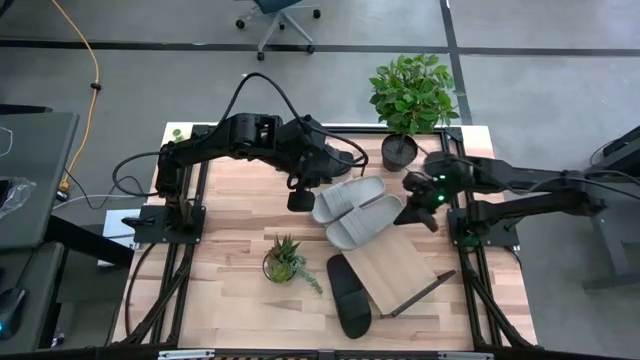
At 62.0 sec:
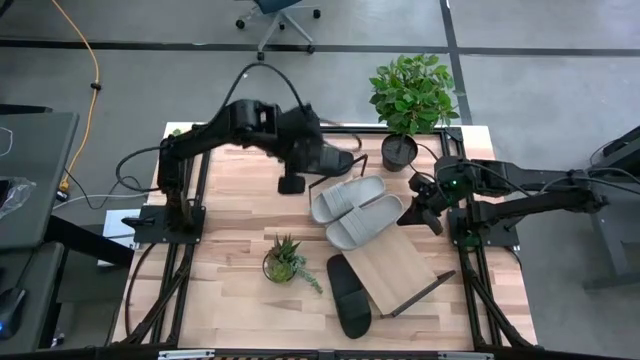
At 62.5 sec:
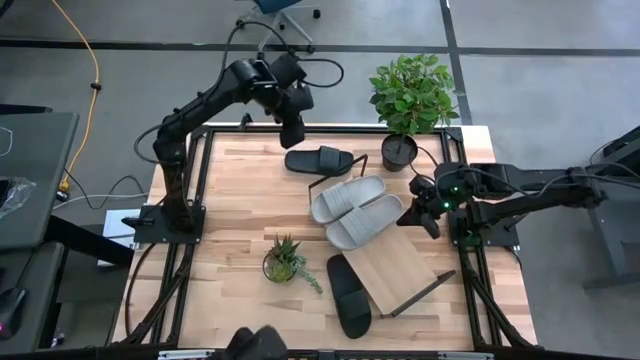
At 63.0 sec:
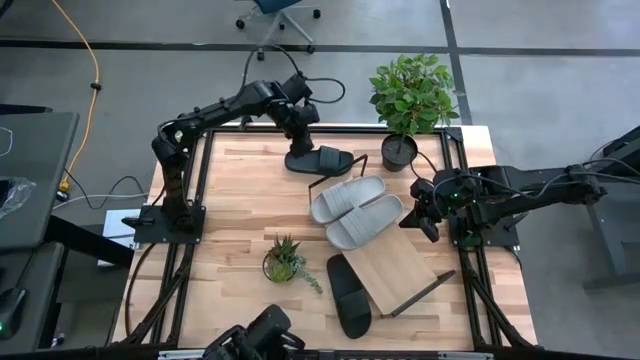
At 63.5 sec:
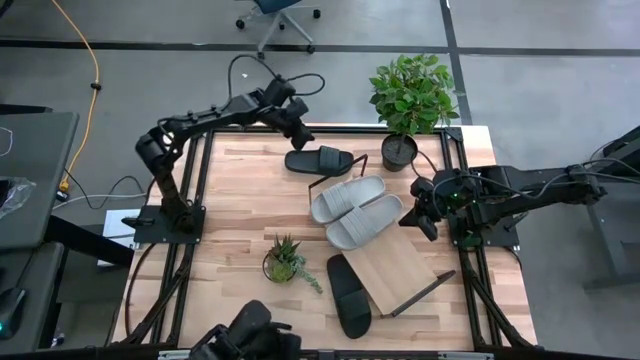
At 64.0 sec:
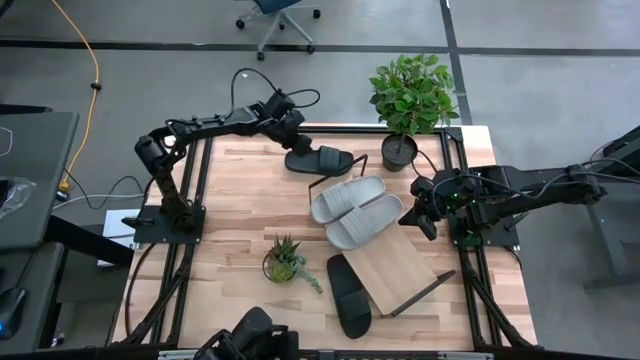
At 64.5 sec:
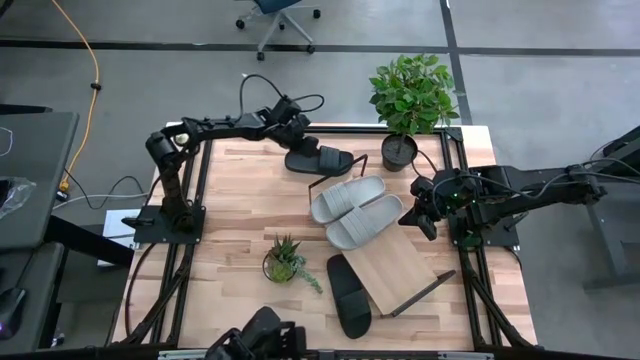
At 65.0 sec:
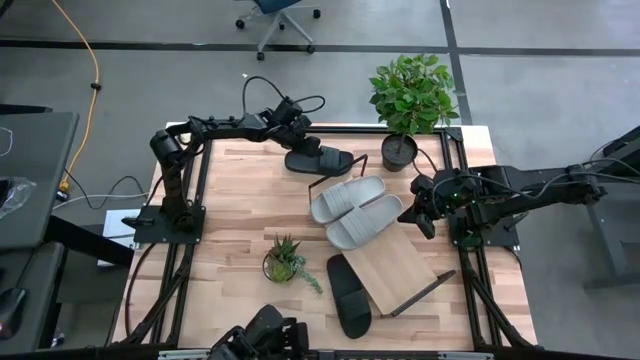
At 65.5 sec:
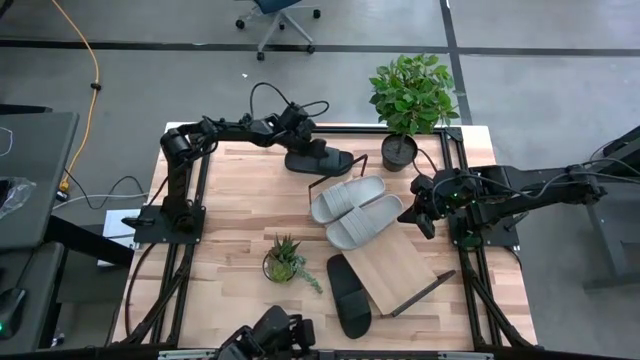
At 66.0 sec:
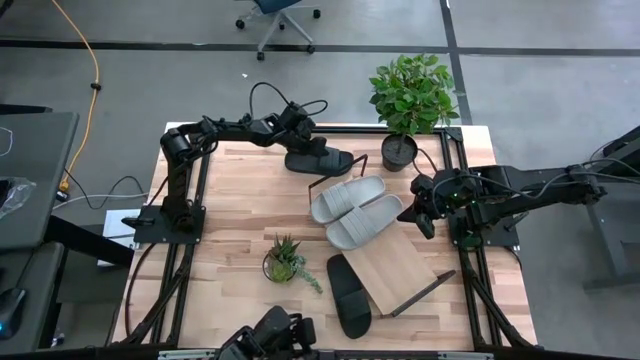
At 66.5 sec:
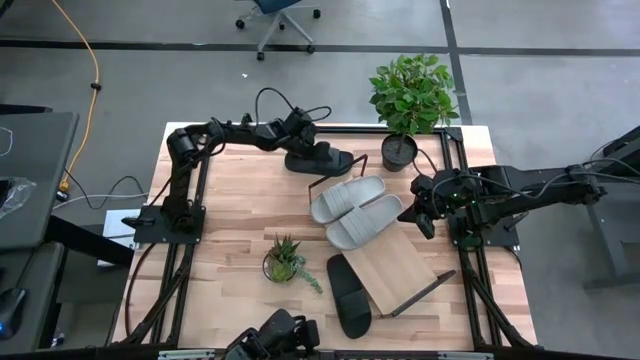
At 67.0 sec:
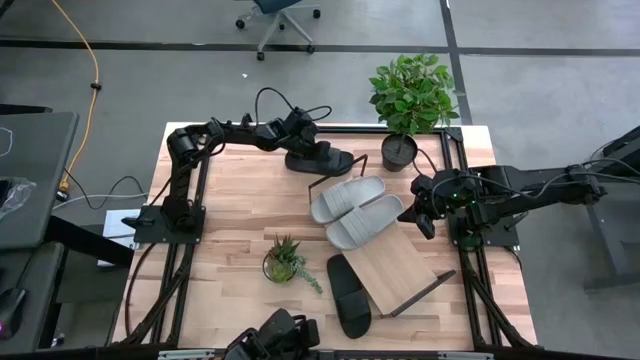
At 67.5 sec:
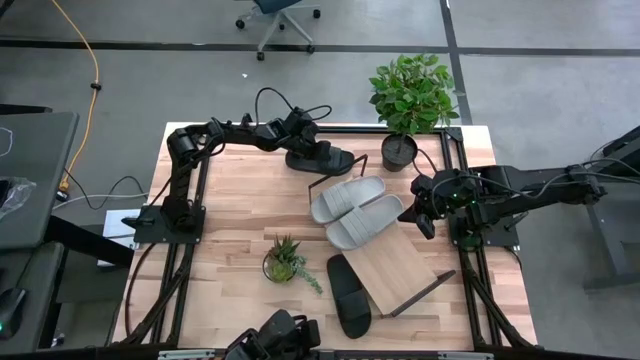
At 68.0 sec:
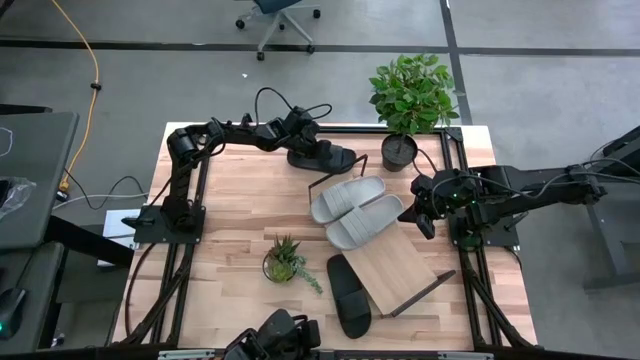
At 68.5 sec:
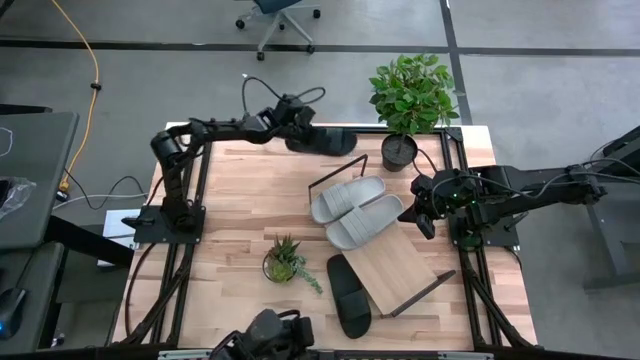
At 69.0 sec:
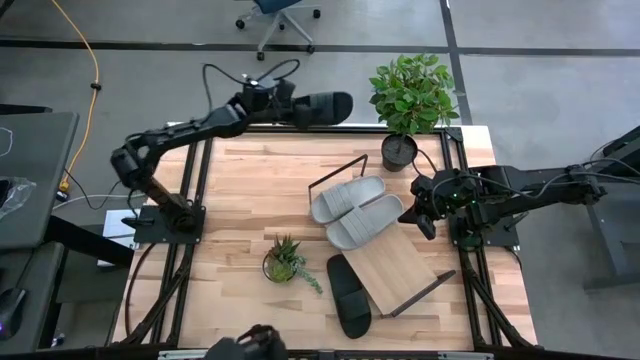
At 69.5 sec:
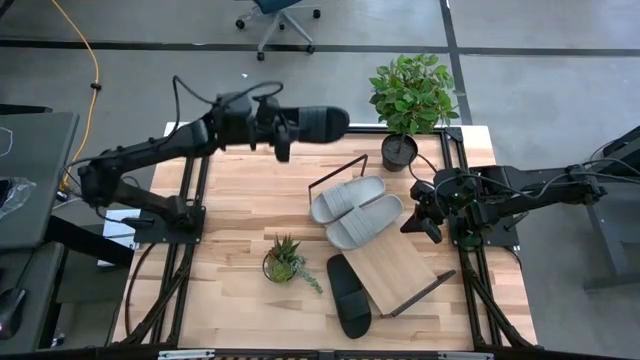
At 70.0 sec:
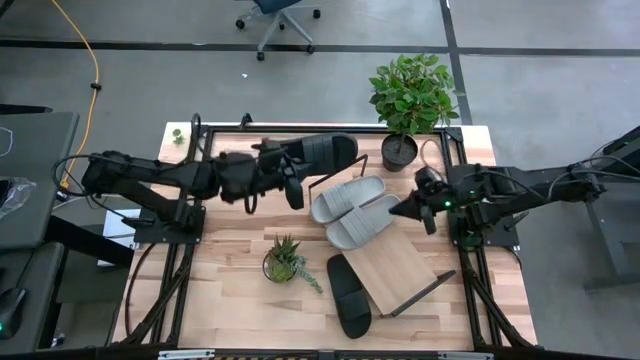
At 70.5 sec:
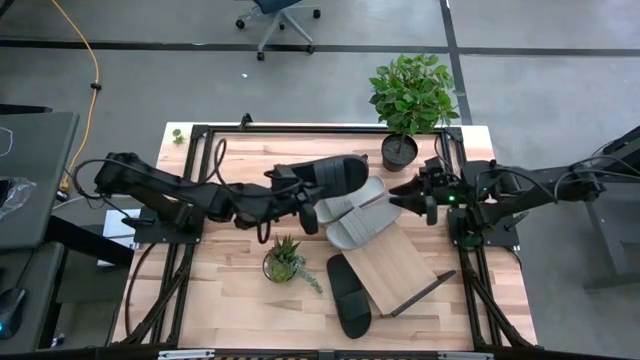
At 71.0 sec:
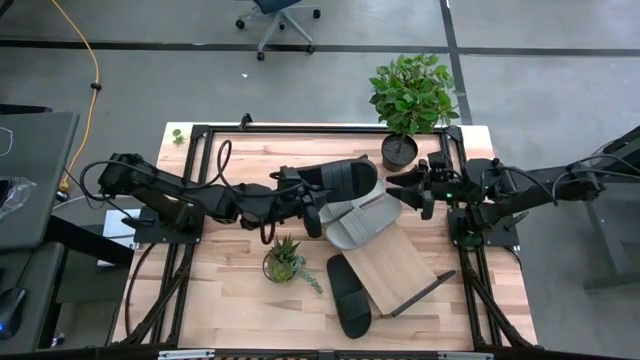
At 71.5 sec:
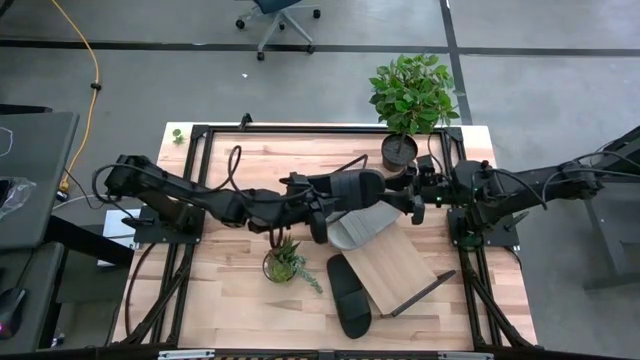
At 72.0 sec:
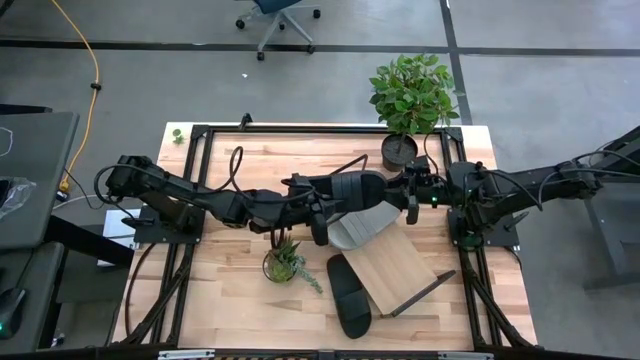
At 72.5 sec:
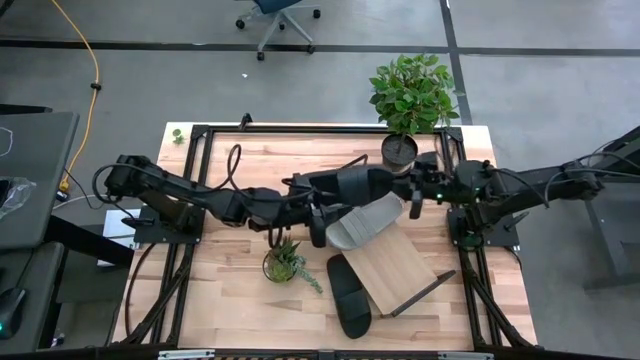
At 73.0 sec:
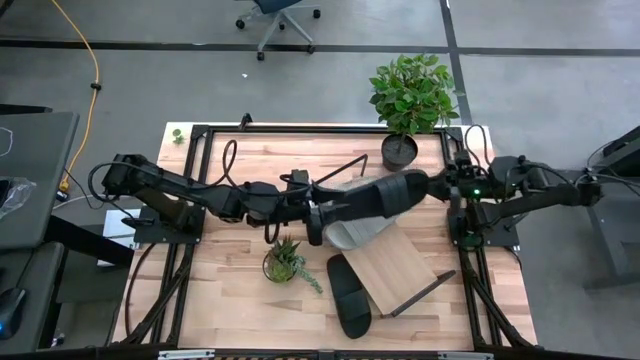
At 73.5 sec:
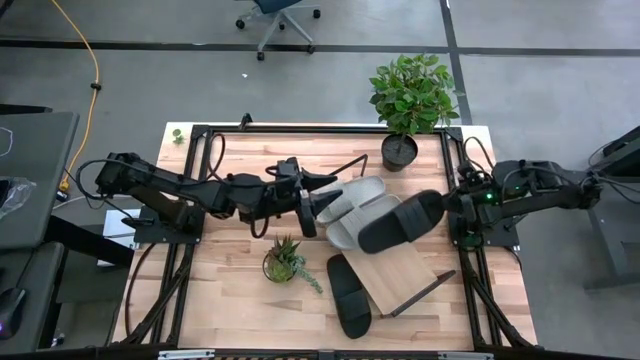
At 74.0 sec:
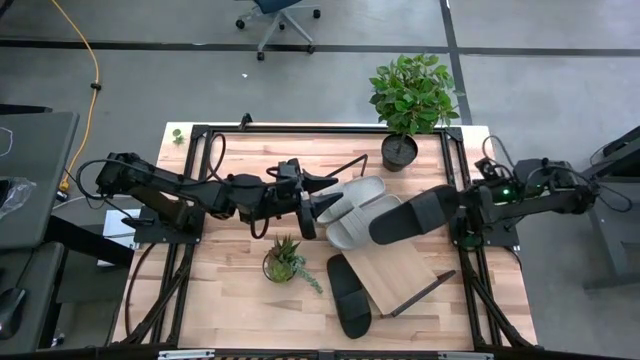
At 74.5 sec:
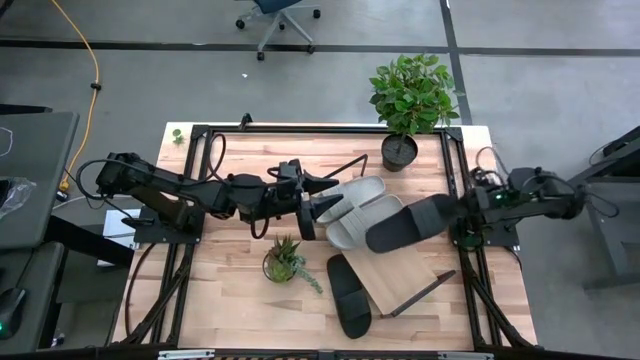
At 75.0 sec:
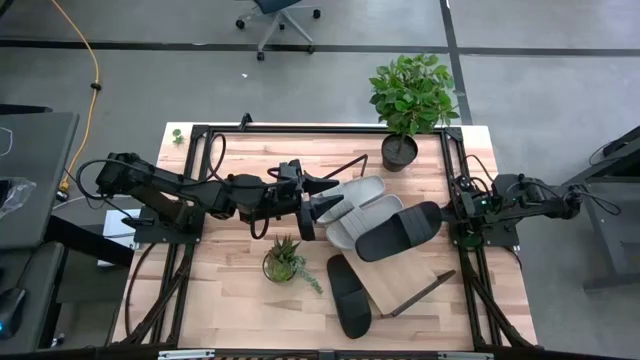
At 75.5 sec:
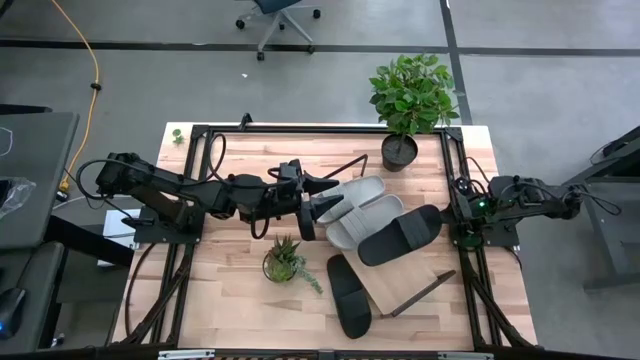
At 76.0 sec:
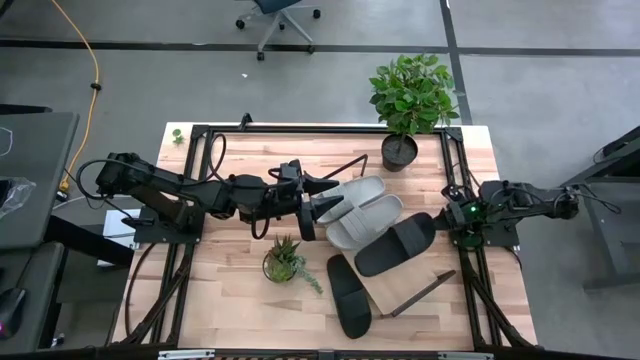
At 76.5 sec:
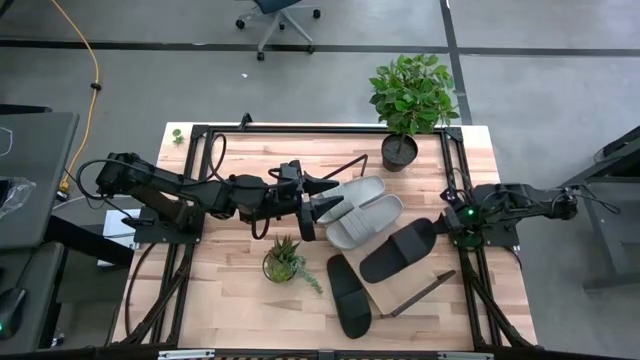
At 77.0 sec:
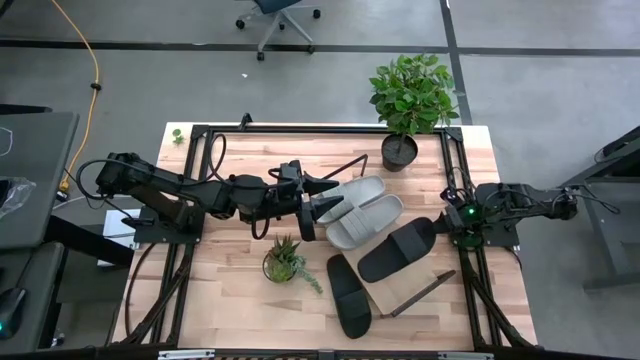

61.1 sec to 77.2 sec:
Task: Pick and place slides into the shelf
Put the top black slide on the shelf
